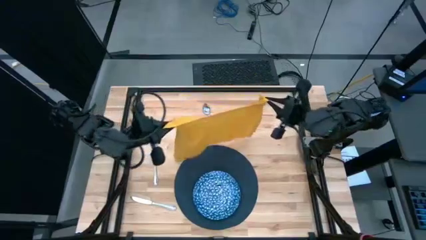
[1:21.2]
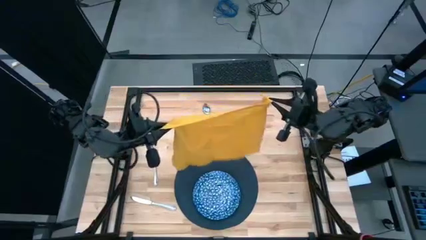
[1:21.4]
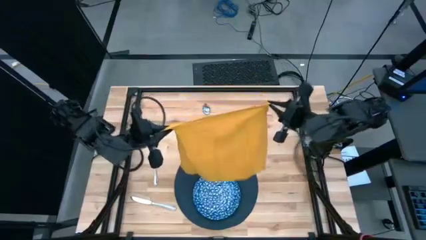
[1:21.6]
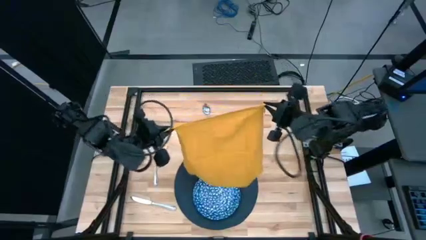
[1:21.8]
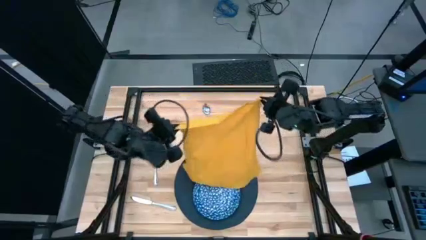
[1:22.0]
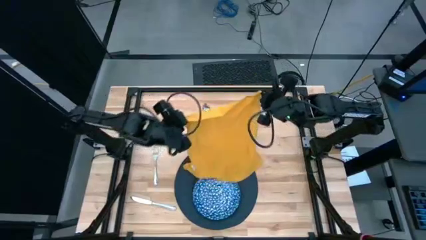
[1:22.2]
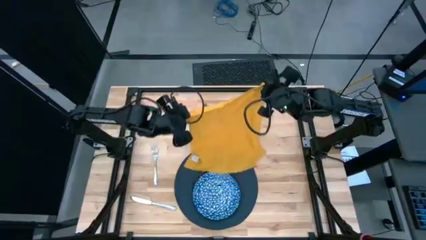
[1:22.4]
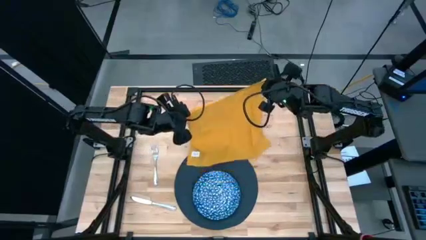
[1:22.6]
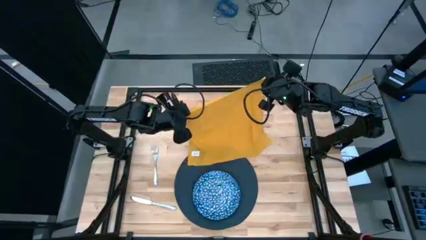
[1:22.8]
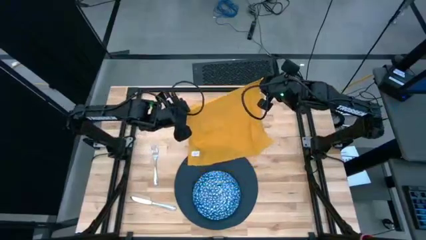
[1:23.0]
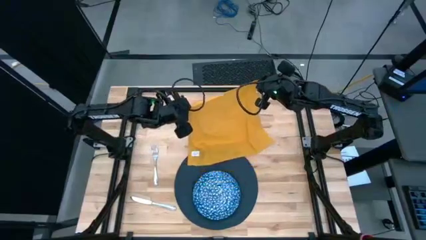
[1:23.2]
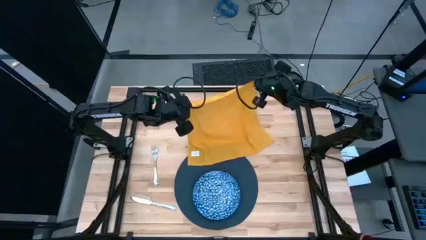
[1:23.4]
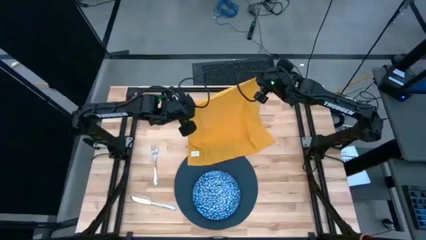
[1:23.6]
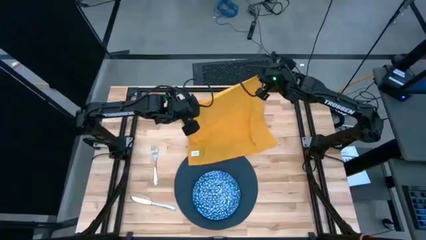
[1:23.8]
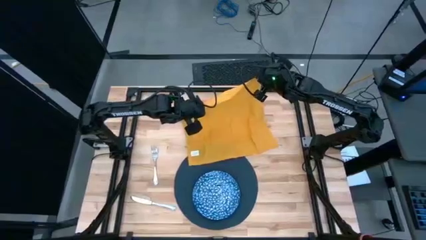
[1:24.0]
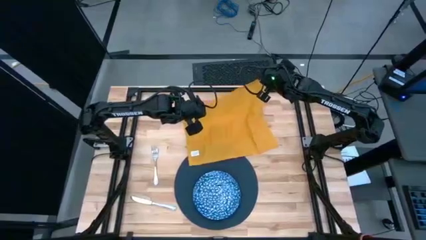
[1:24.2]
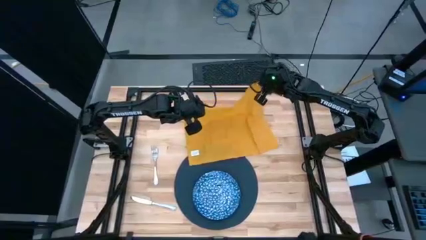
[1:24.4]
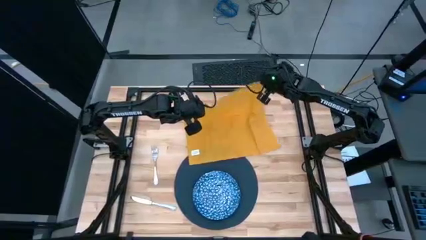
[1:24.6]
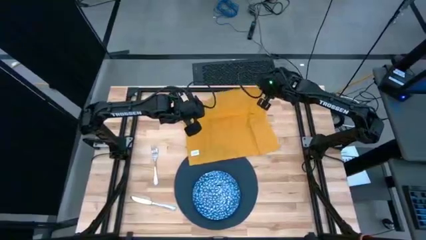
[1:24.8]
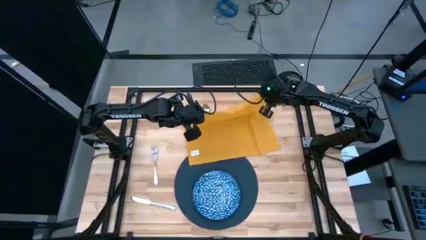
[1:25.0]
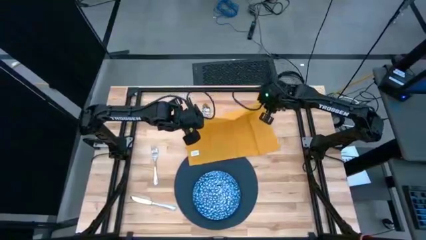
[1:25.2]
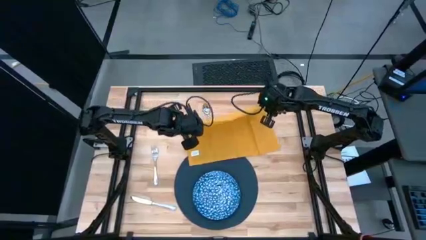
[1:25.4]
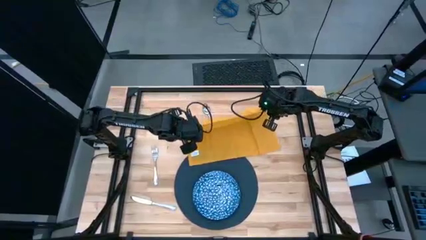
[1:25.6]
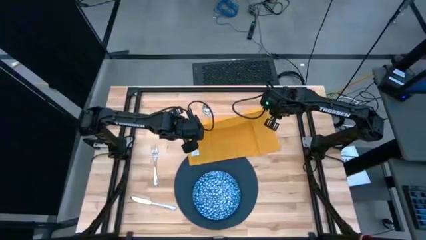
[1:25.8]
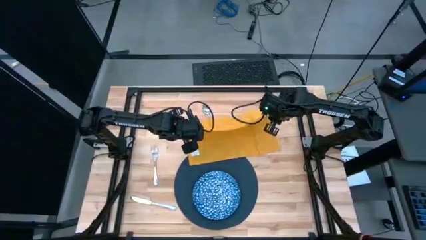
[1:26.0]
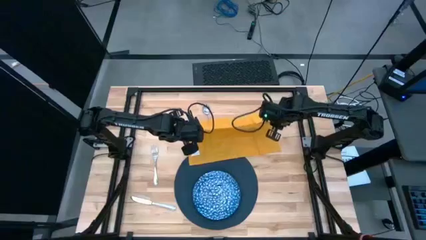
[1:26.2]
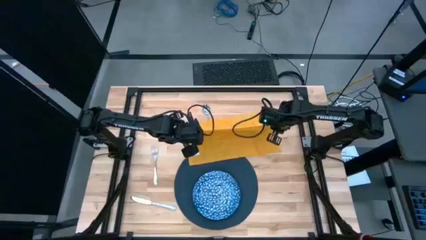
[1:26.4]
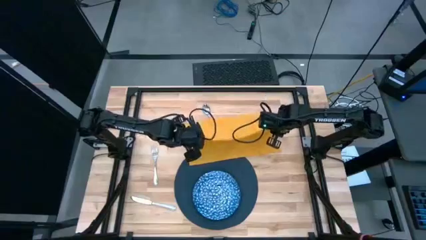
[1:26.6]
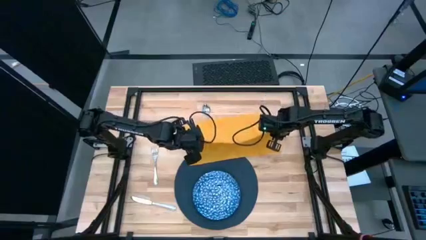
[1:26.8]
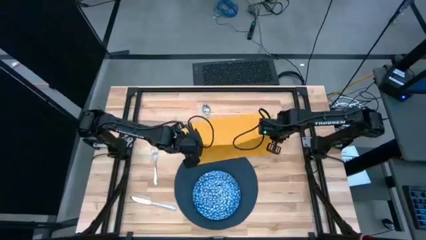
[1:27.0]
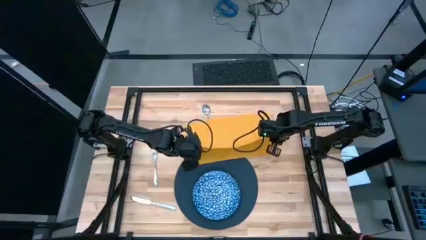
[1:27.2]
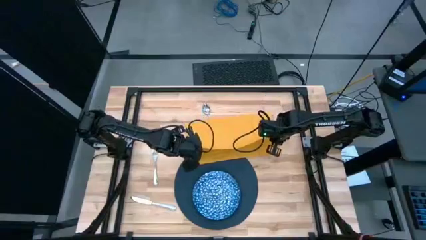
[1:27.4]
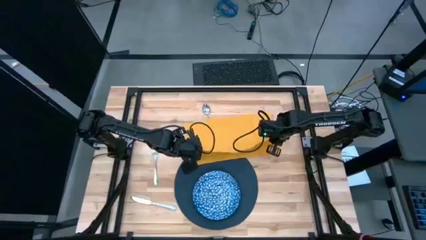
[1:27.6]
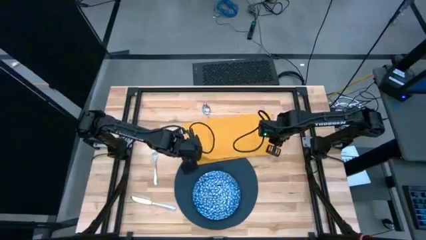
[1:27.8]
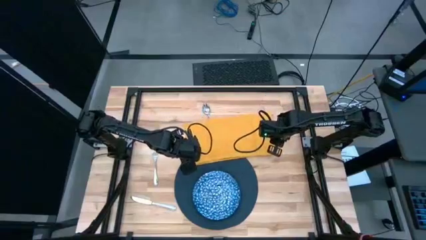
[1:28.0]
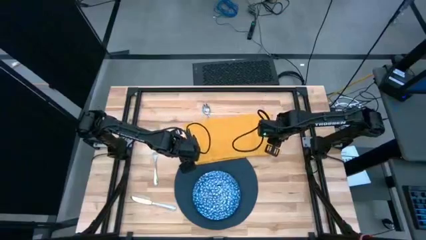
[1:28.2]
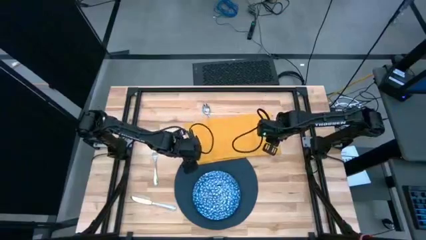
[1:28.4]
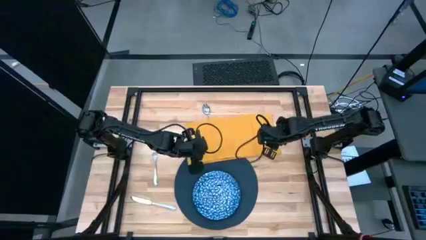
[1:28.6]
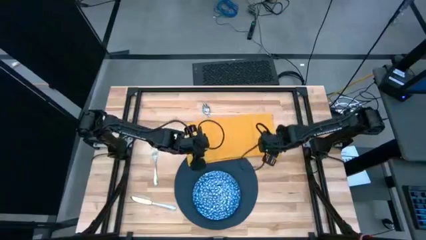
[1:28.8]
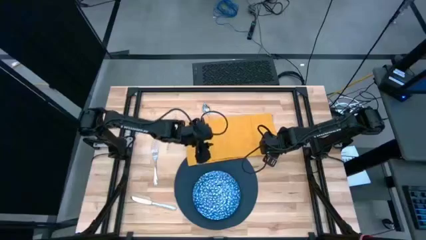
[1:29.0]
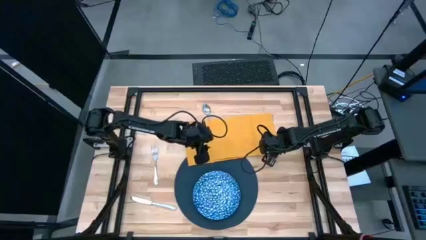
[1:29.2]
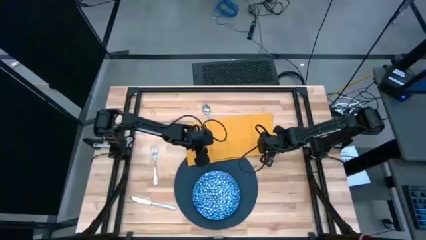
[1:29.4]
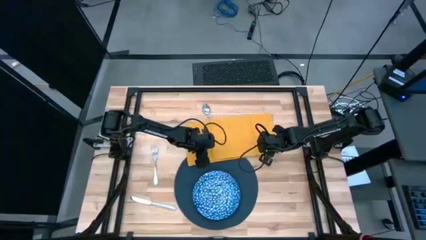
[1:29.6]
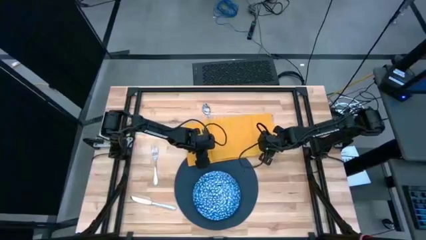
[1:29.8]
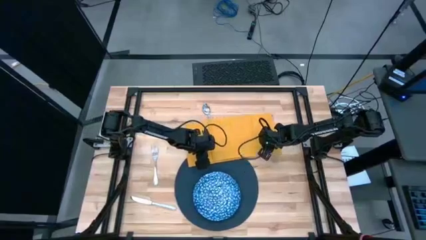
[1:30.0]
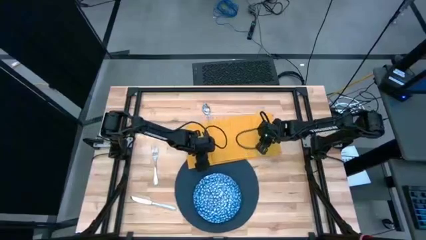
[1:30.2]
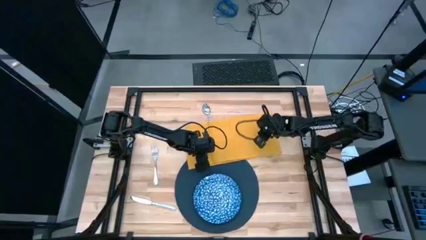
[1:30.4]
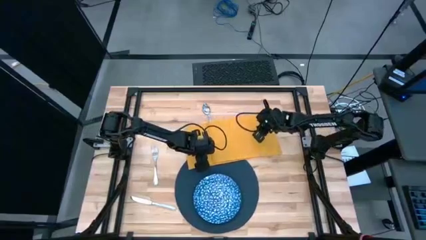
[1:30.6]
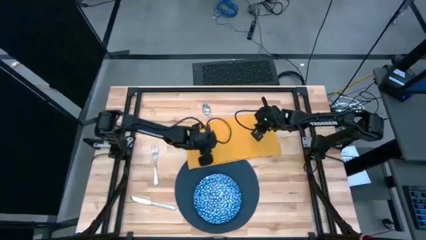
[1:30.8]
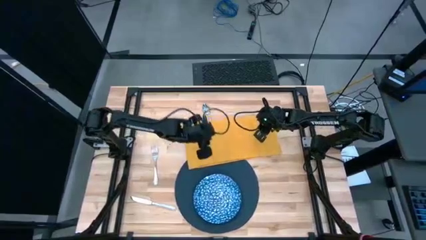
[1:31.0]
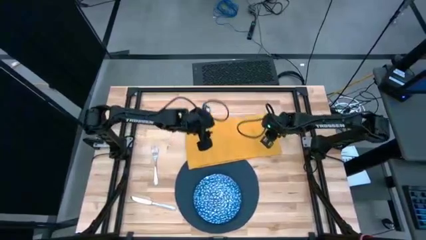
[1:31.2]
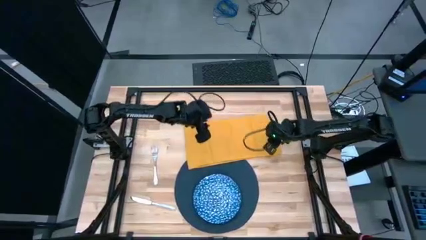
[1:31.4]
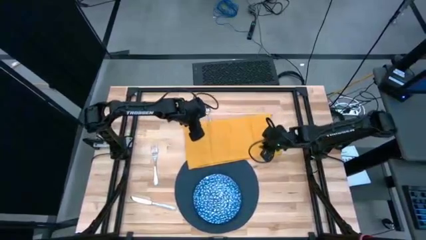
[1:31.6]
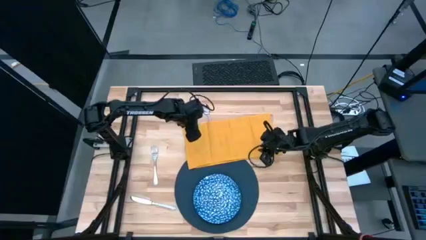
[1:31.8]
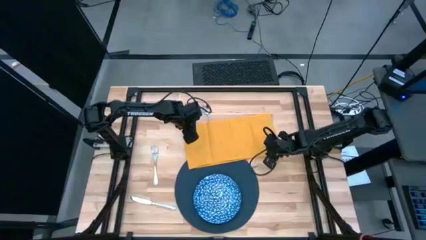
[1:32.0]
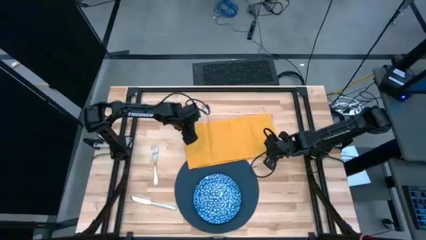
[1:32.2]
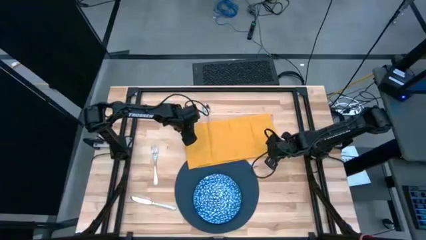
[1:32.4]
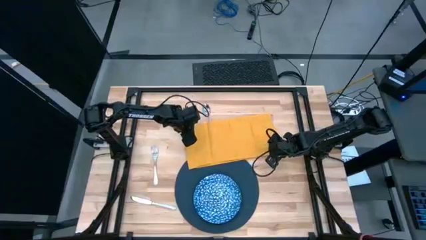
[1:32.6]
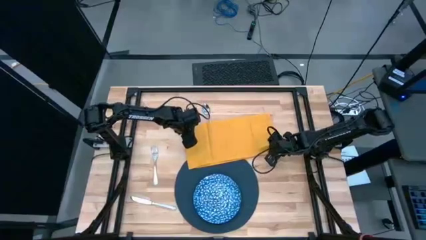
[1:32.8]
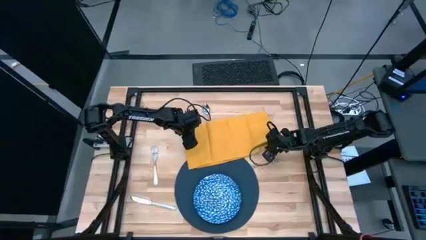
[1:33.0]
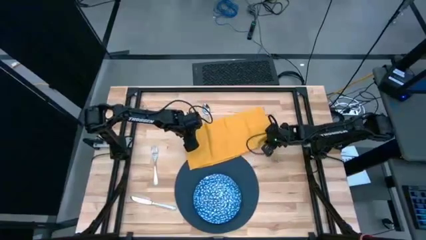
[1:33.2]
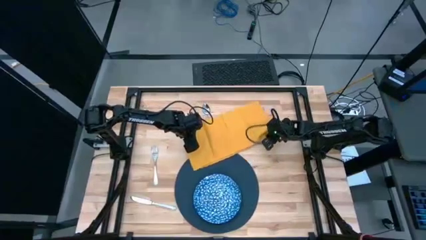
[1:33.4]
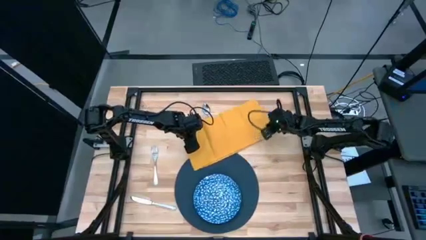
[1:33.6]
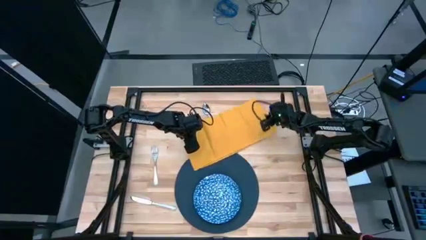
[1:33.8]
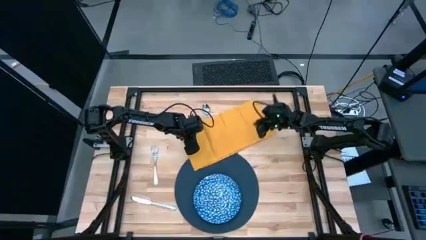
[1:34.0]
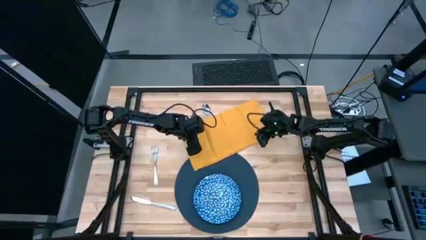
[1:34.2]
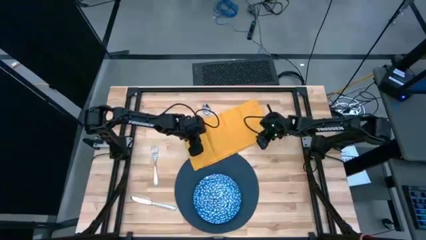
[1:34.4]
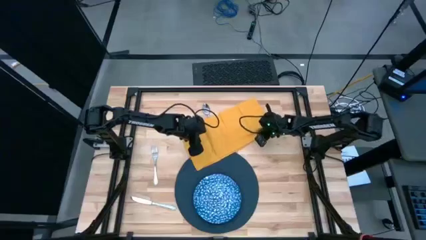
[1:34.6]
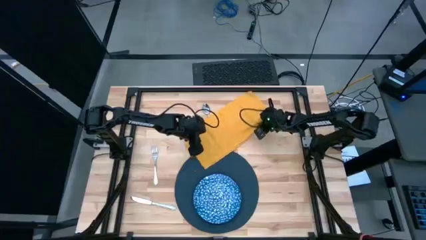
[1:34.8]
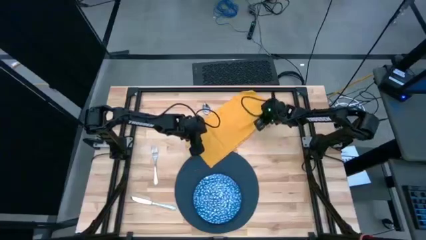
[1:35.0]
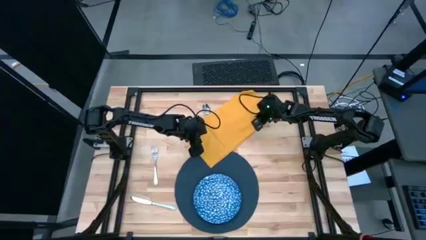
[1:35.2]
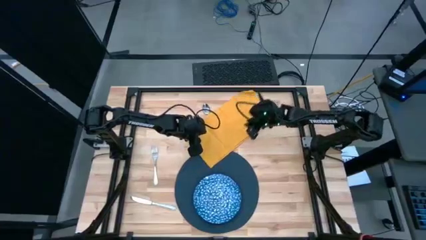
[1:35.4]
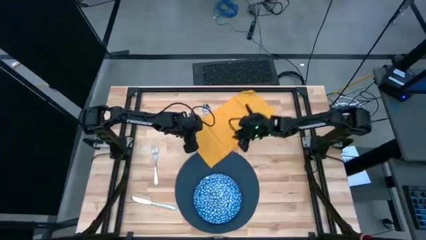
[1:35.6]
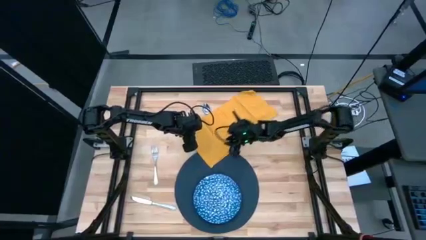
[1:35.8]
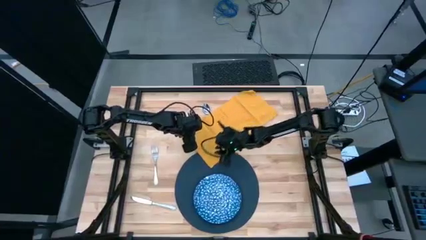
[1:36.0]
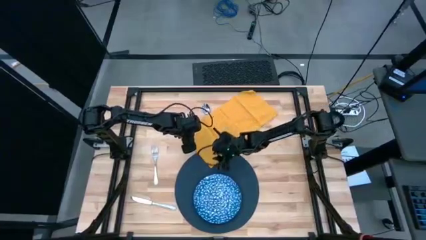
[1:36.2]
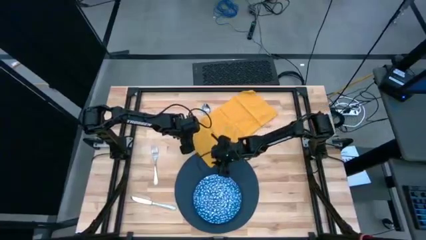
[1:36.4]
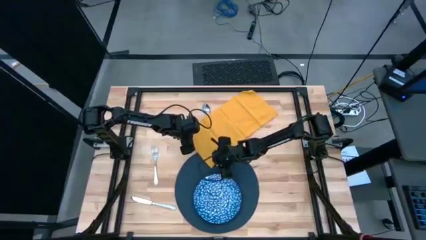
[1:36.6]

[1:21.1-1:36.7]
Task: Set table place
Fold the yellow table napkin
